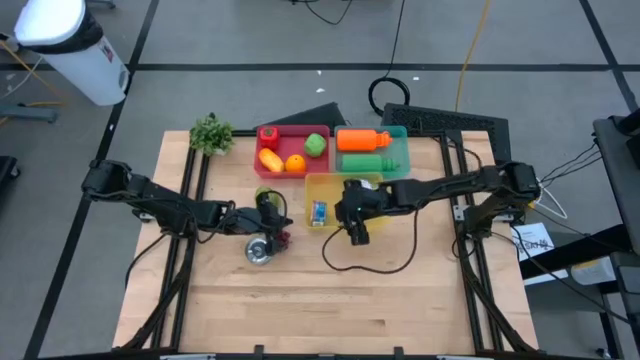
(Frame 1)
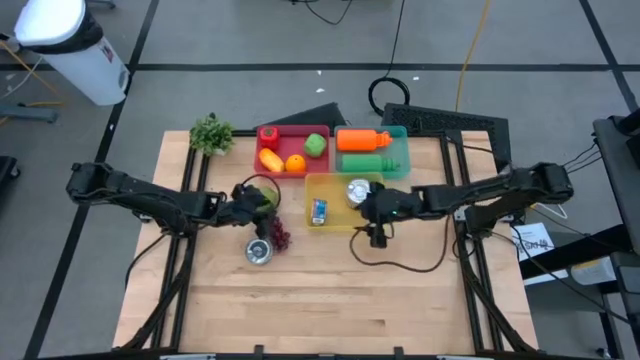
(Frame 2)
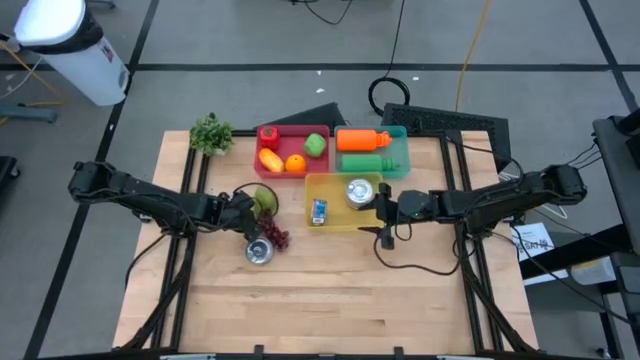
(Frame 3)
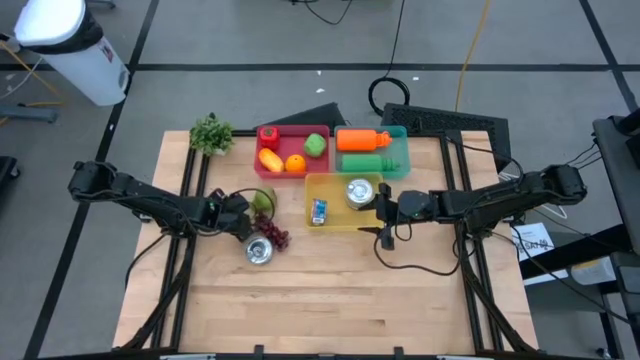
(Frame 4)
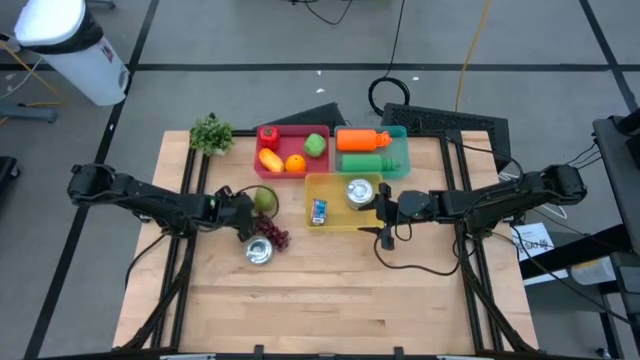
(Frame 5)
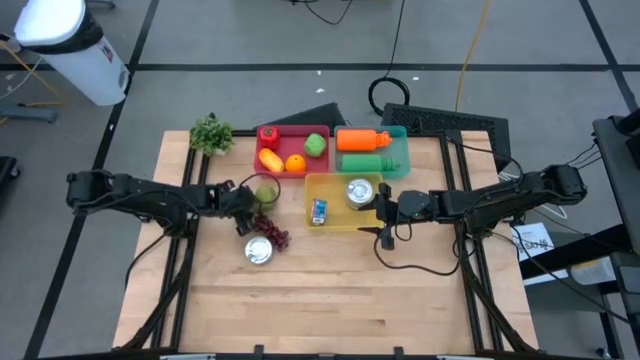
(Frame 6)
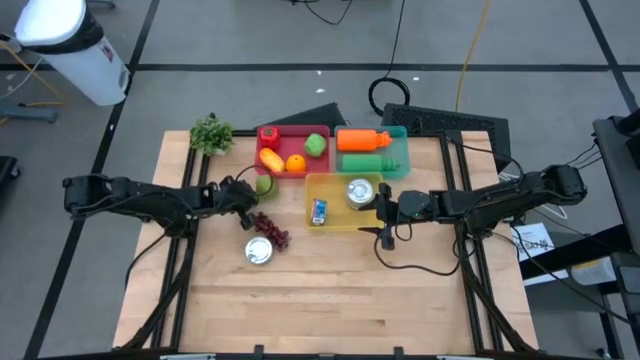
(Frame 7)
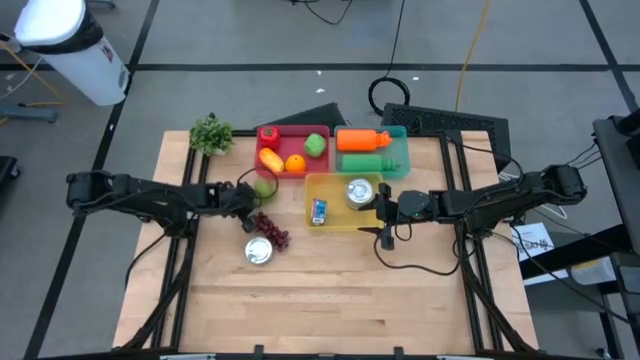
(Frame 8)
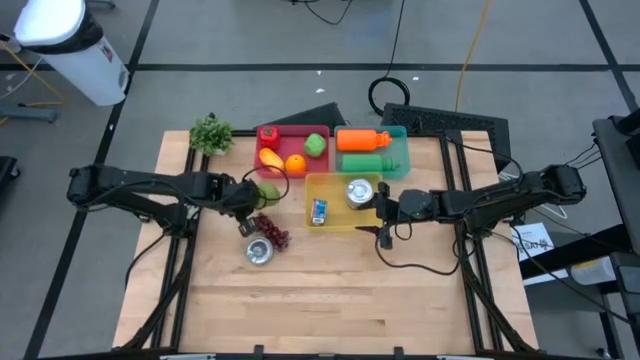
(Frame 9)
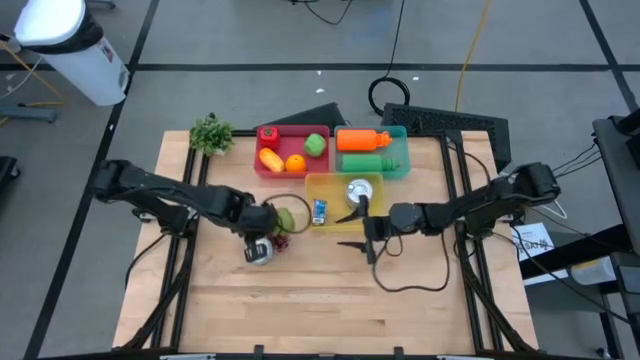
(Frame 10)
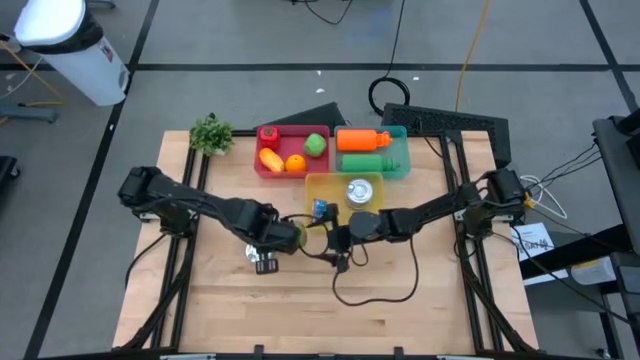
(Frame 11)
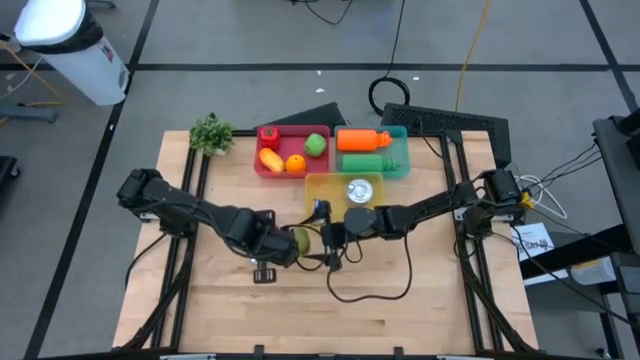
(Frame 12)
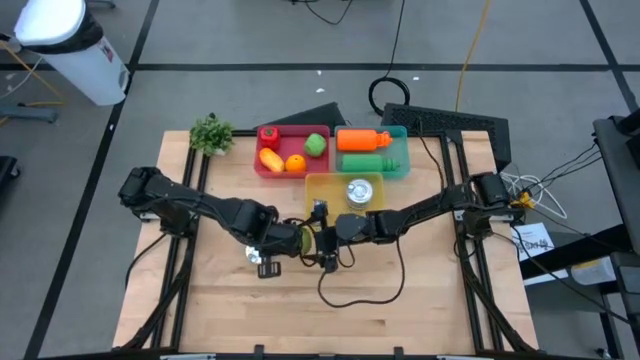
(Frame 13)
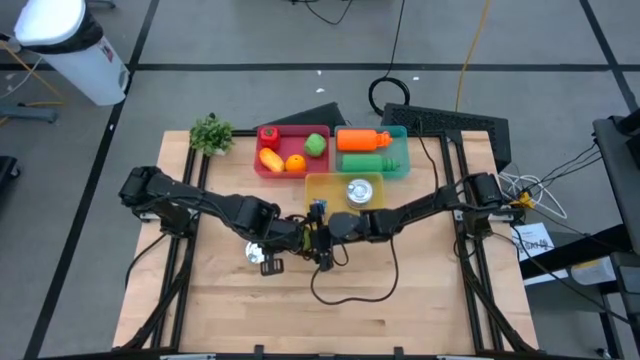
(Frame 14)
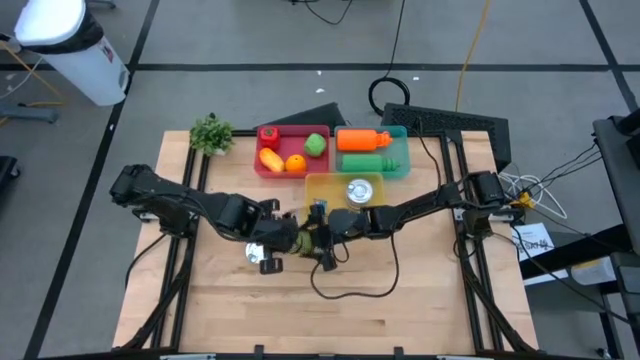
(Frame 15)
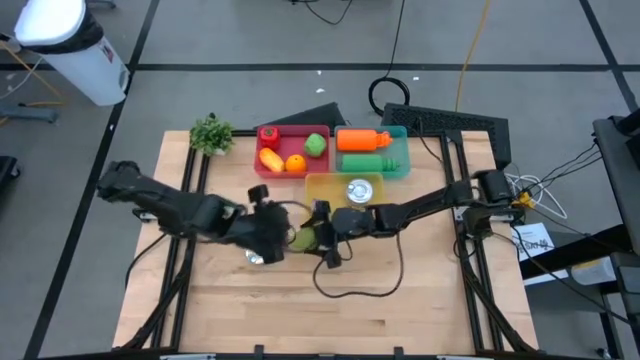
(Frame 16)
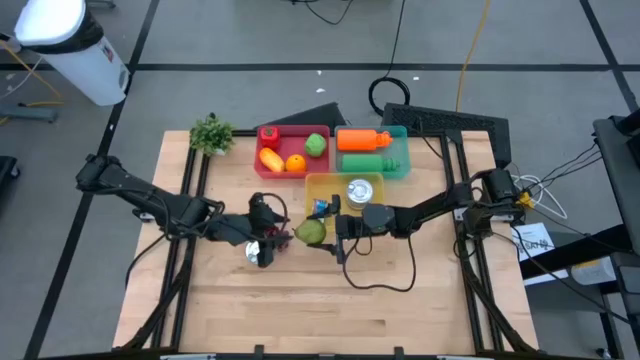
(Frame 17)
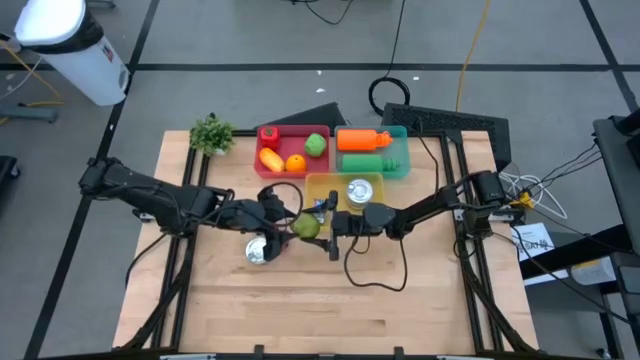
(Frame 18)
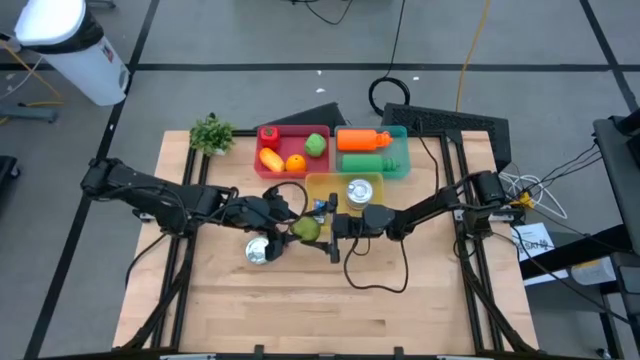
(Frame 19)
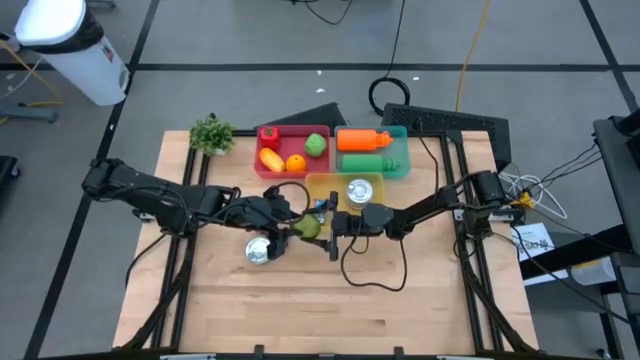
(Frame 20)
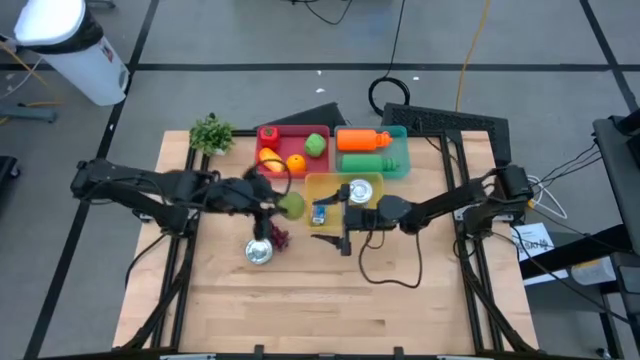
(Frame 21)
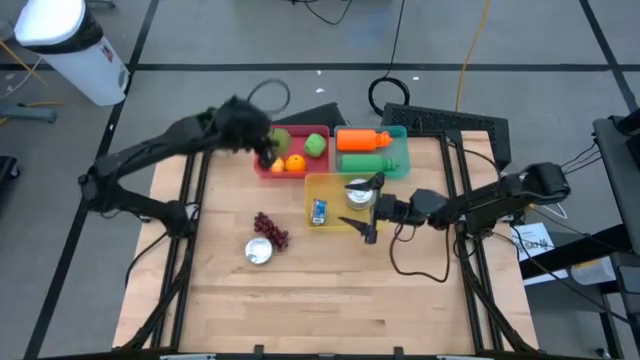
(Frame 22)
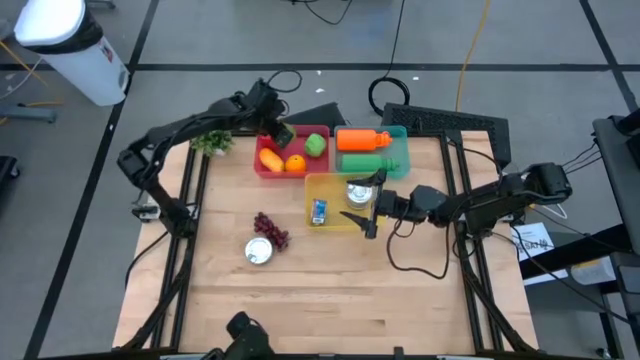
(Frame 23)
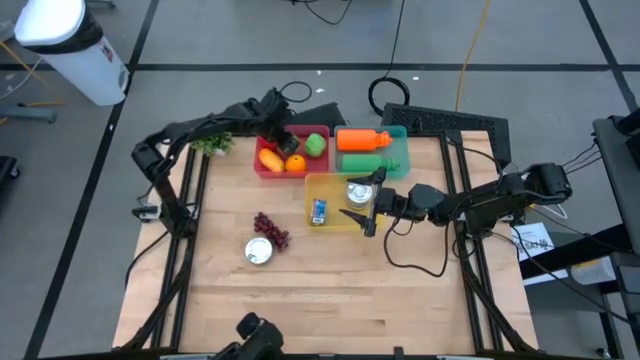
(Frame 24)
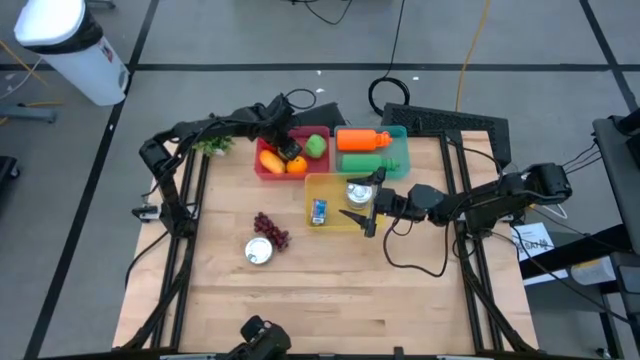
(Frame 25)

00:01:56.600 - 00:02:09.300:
Task: Pick & Place Food Item
Put the green pear into the red bin

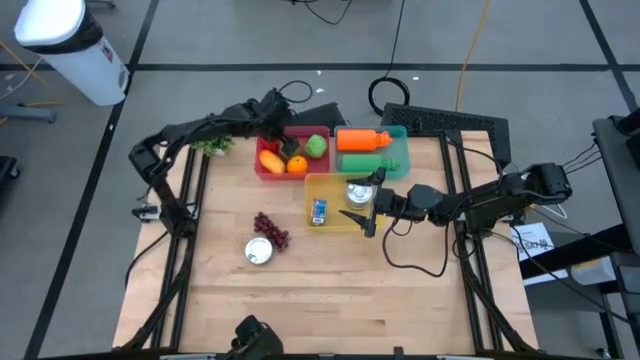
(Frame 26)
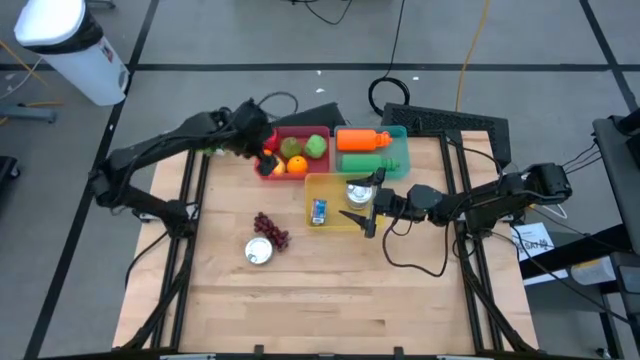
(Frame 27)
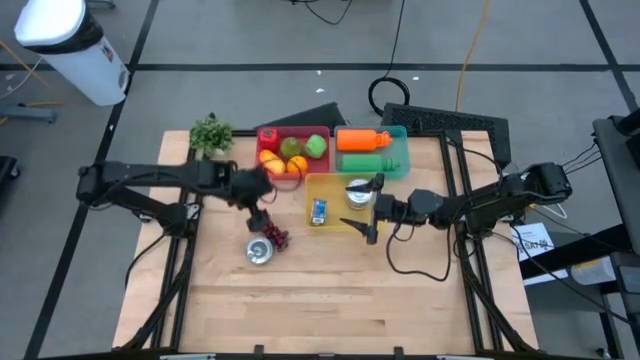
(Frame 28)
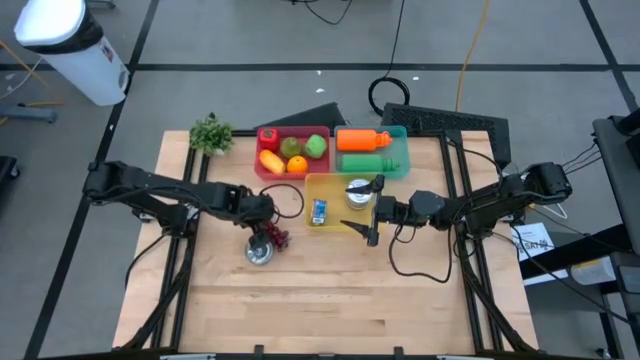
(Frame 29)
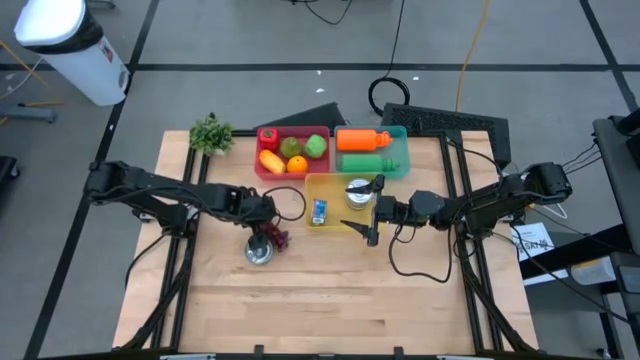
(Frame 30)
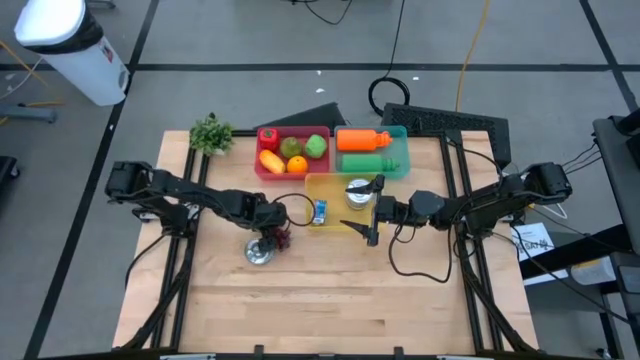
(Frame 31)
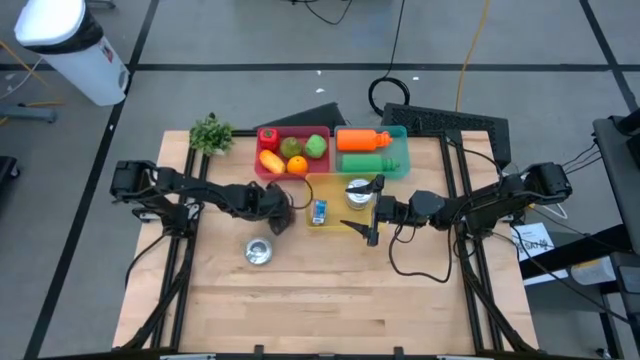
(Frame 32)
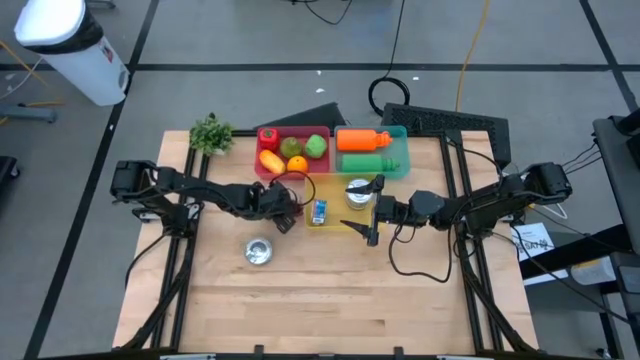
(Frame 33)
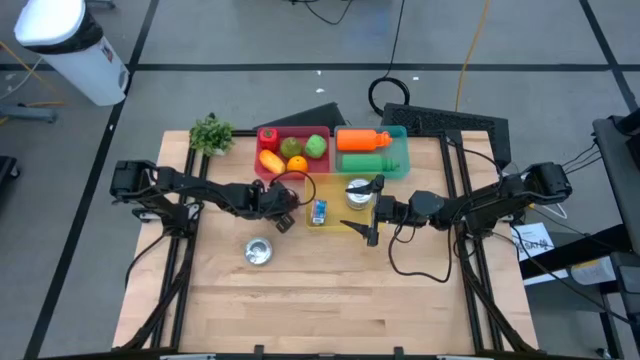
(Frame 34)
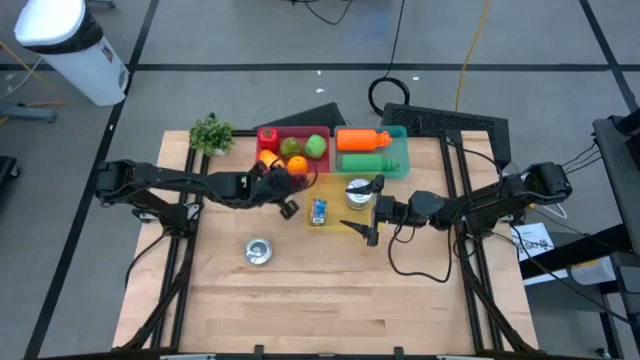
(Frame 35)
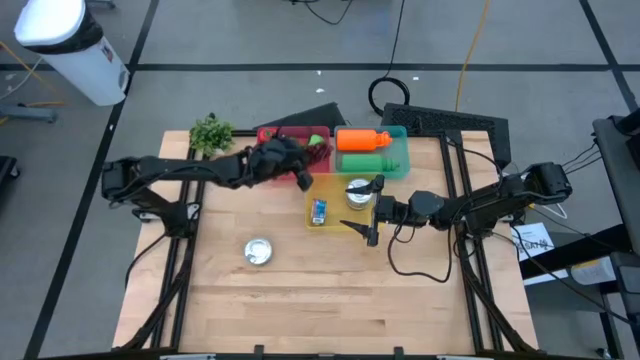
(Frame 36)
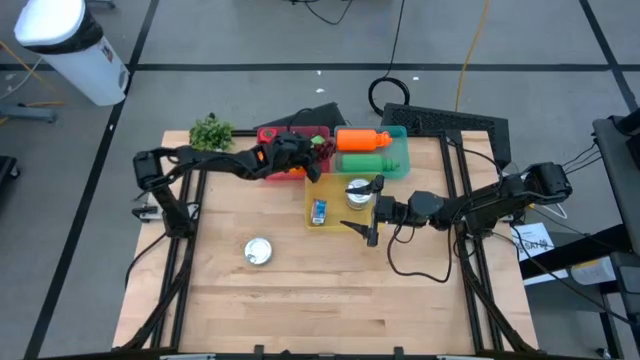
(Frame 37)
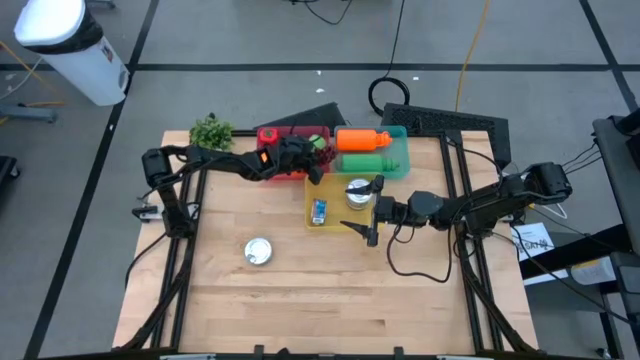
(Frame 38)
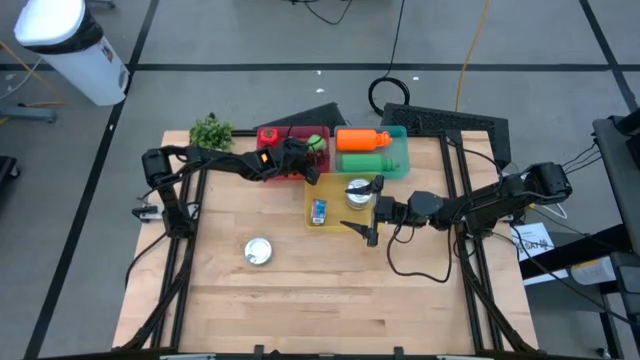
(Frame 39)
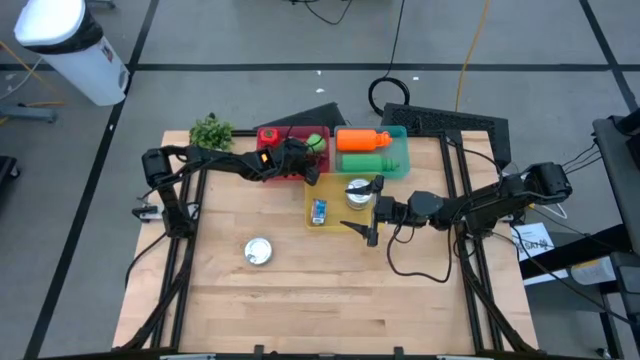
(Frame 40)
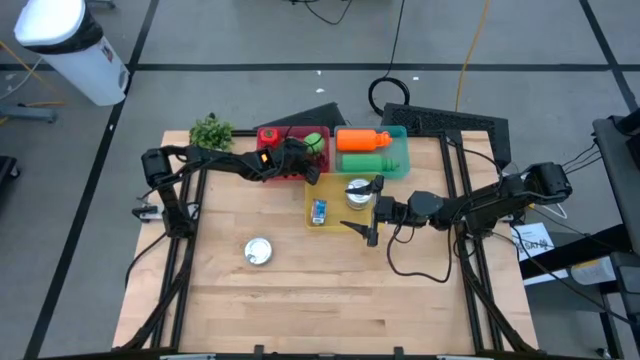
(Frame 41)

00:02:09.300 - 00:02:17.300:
Put the red grapes into the red bin

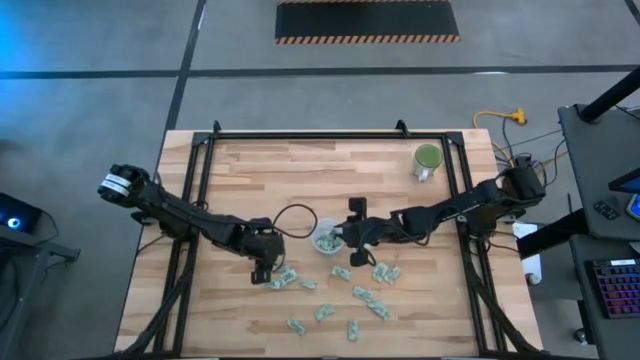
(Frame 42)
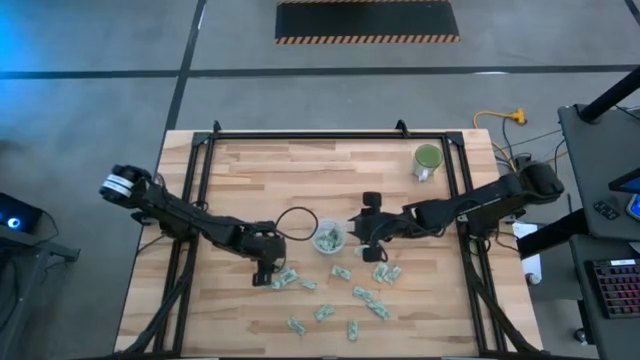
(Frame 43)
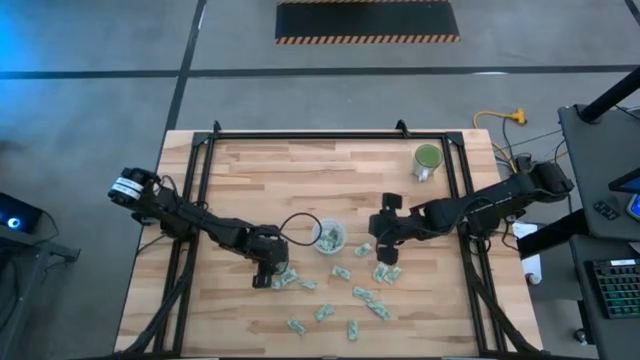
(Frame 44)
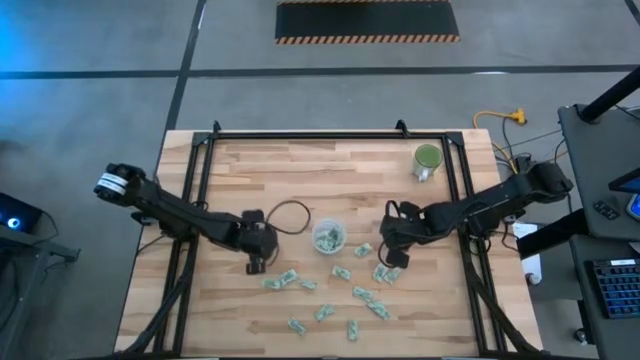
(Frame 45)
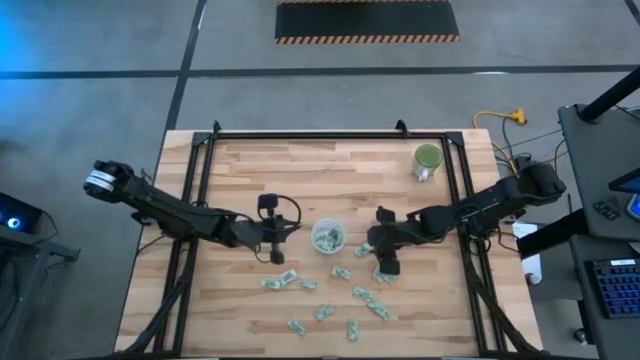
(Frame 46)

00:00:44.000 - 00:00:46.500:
Task: Pick and place Stevia / Truvia into bins
Put the light green stevia packet into the transparent container
